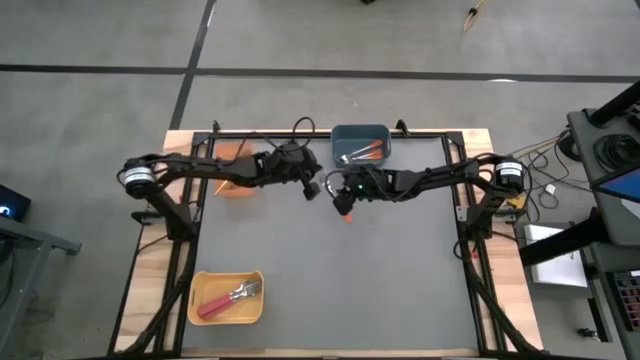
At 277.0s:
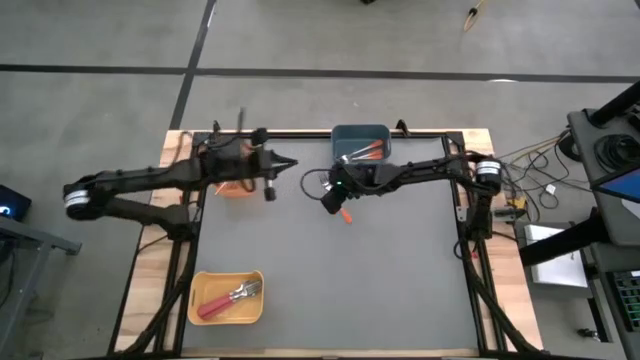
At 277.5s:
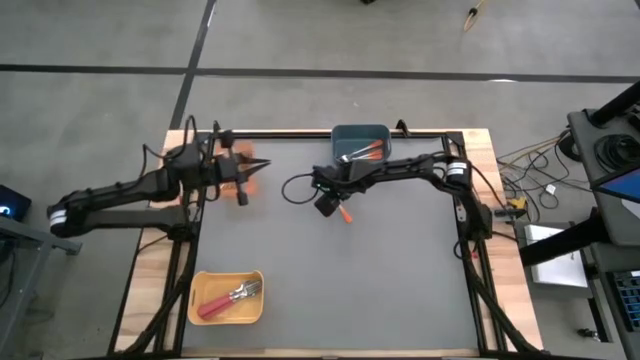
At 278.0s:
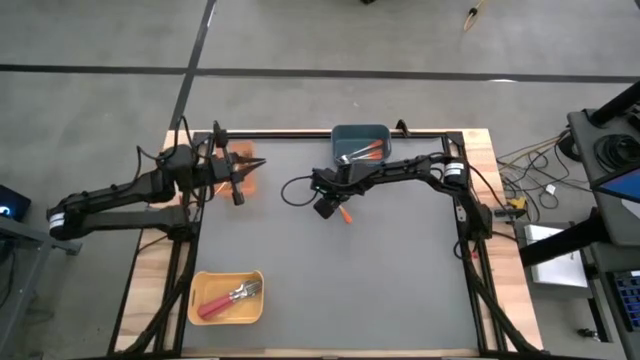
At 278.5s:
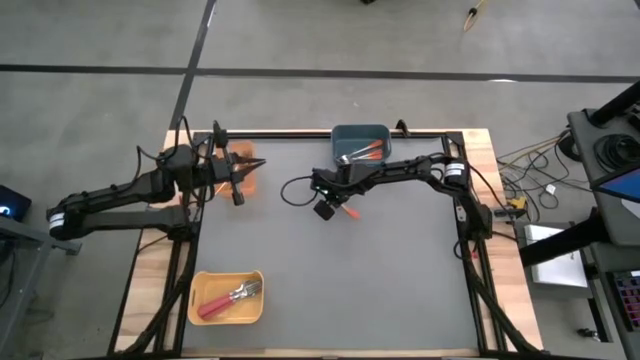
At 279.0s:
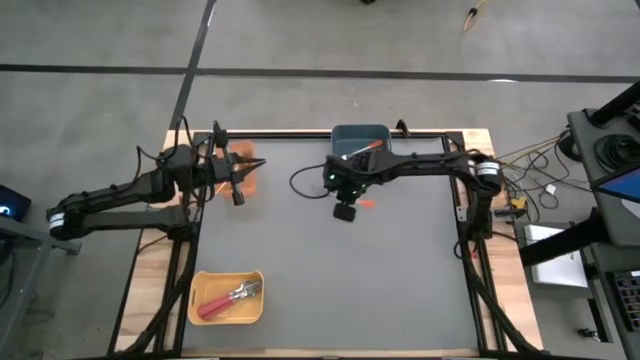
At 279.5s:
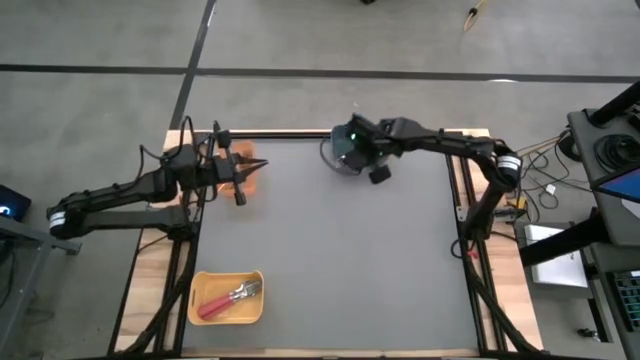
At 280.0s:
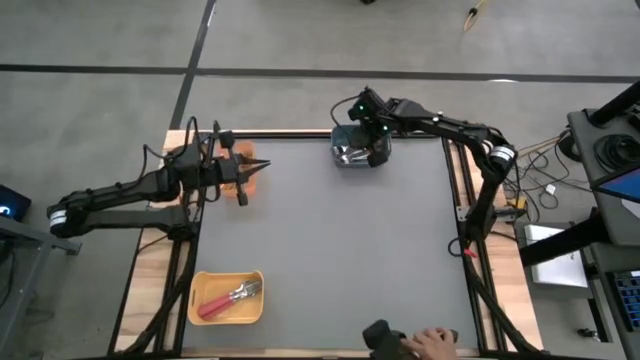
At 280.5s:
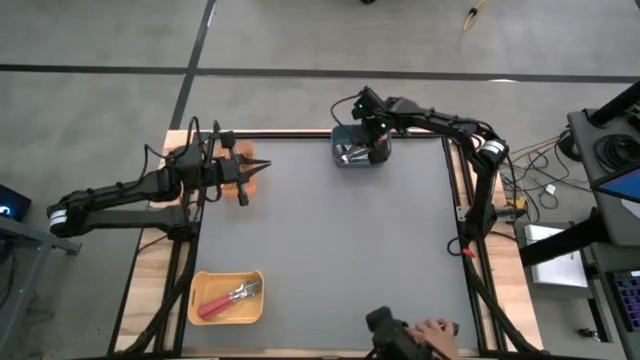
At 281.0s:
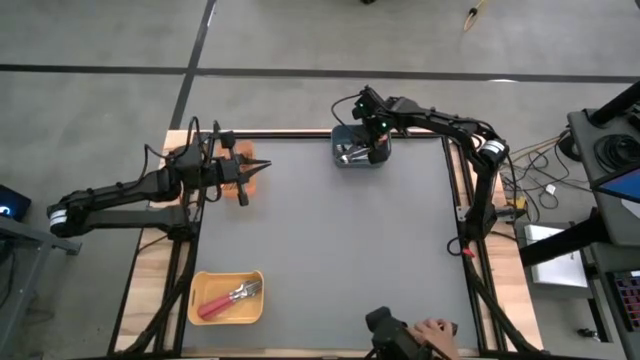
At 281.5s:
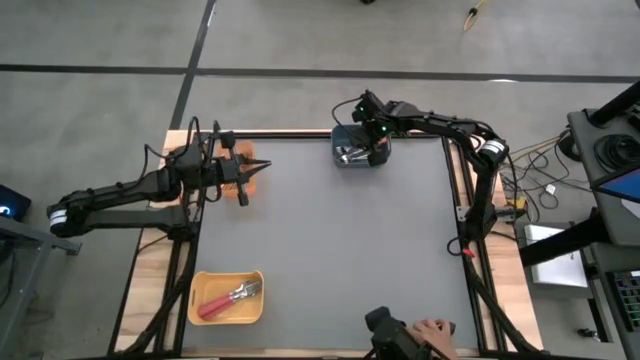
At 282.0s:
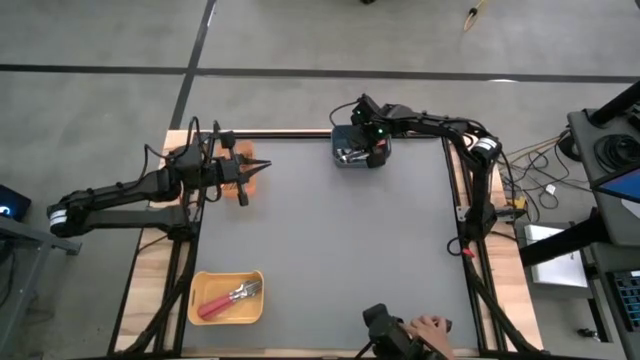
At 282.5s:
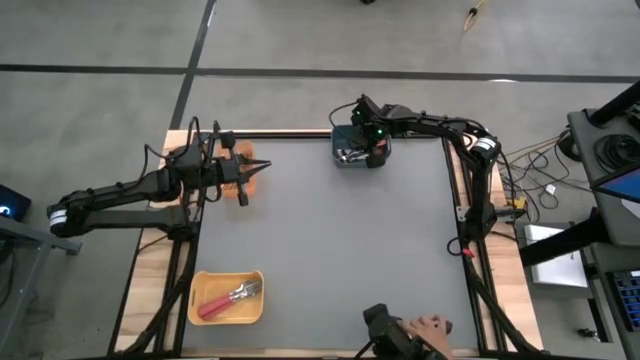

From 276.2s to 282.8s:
Task: Sort silverware by color (type)
Put the orange fork into the blue bin

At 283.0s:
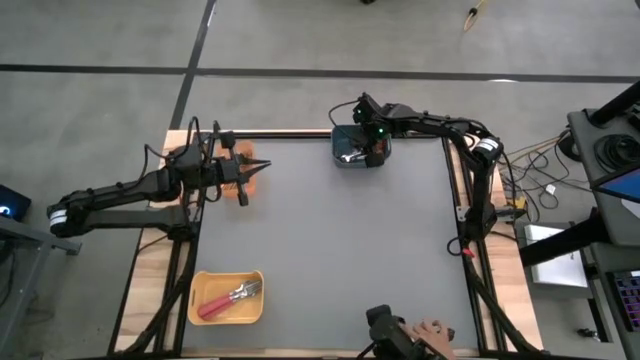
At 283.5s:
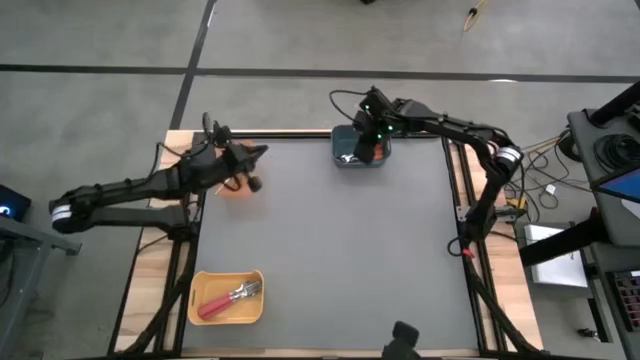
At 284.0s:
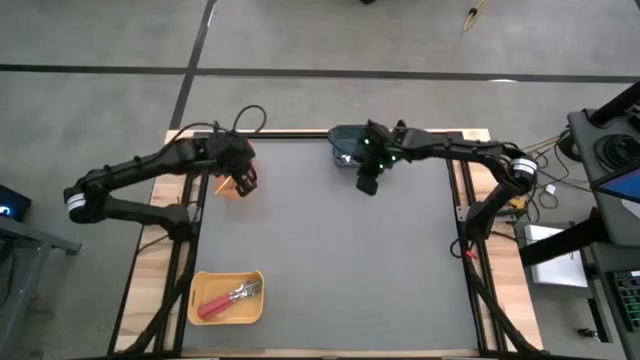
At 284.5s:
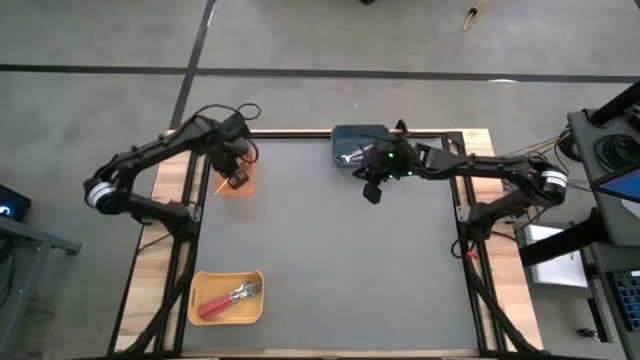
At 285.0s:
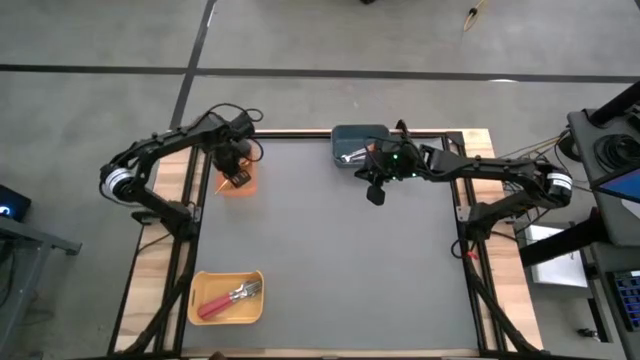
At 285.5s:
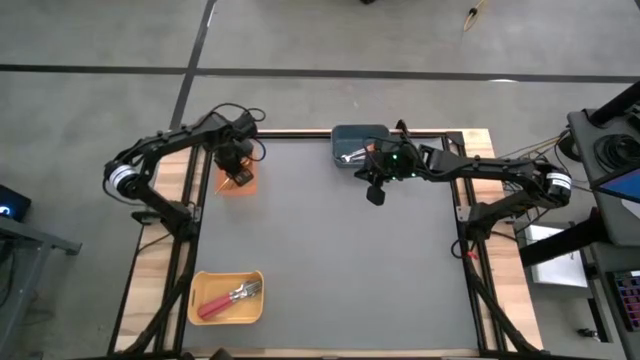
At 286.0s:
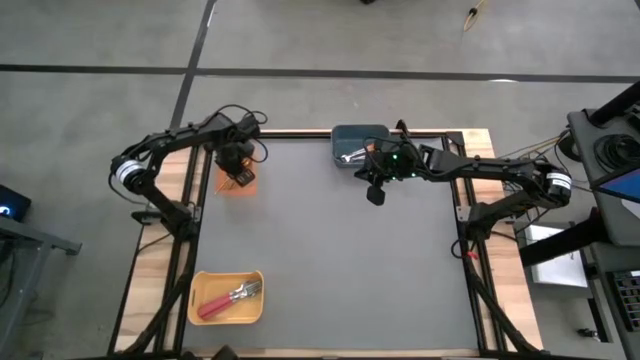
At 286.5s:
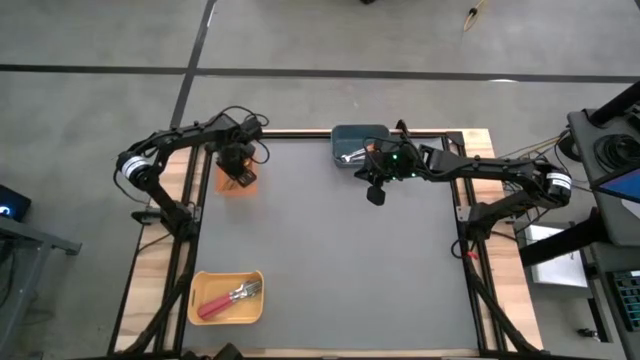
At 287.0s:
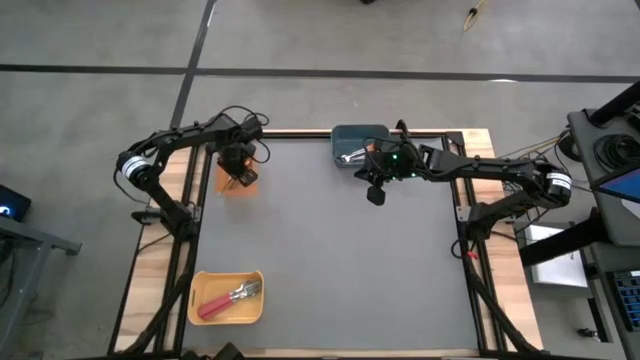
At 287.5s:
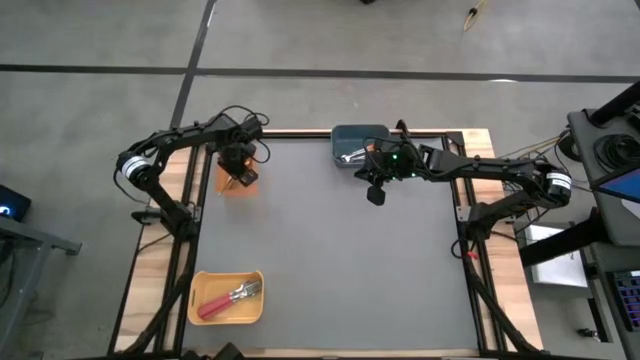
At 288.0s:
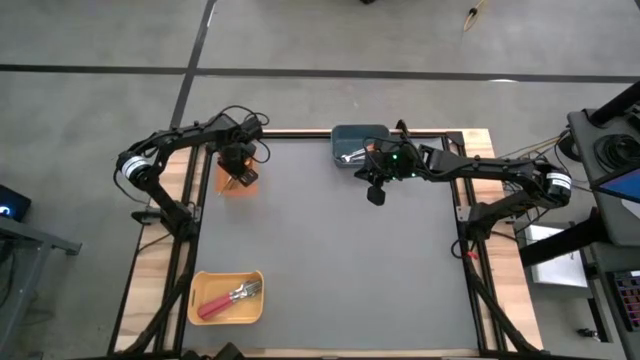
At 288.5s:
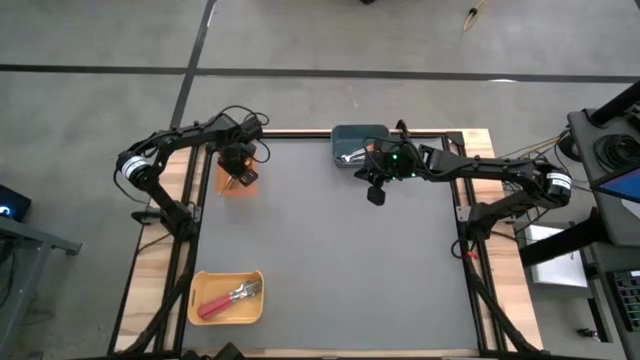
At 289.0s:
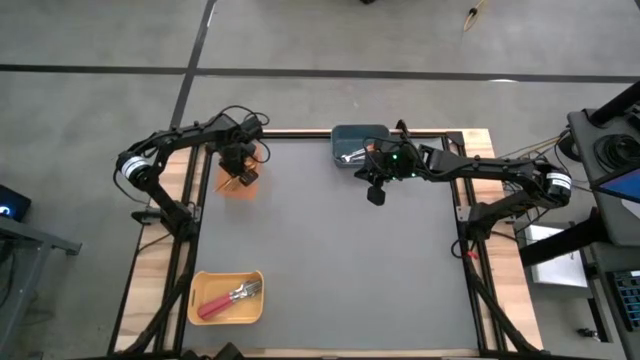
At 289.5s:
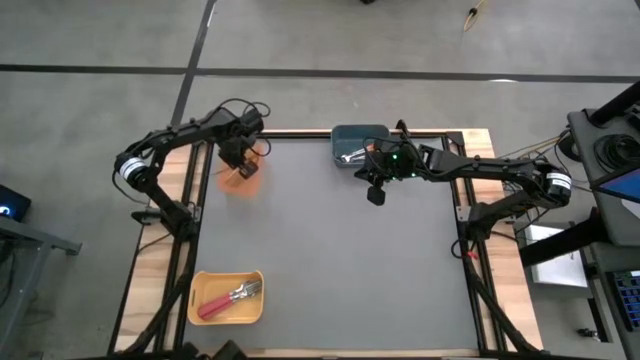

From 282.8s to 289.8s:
Adjust the gold fork into the orange bin

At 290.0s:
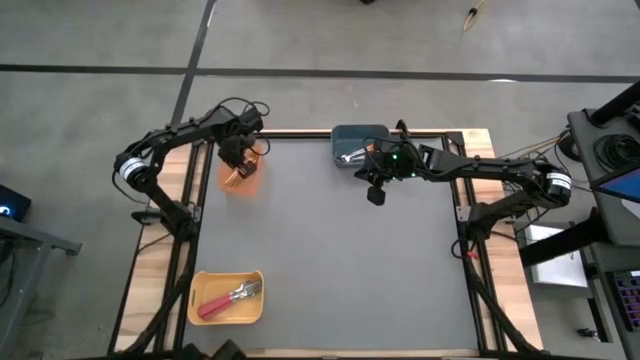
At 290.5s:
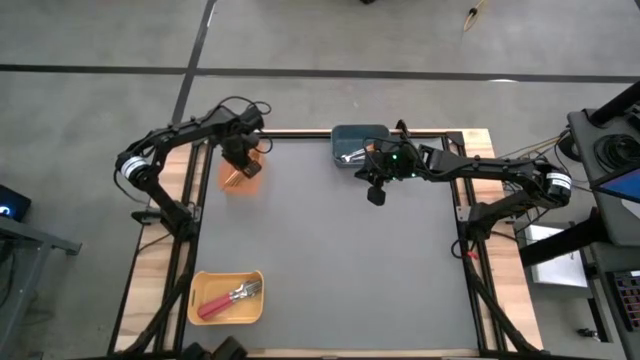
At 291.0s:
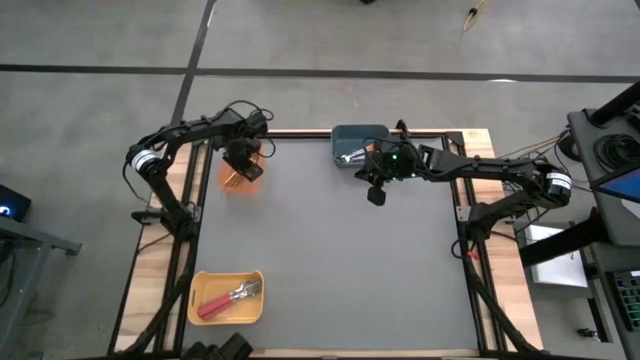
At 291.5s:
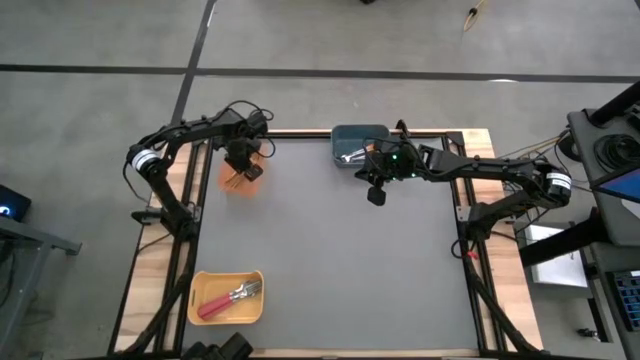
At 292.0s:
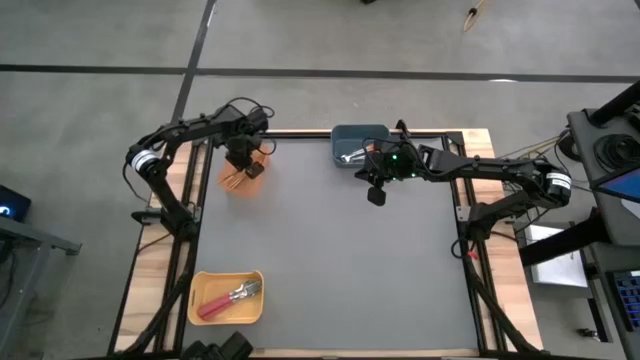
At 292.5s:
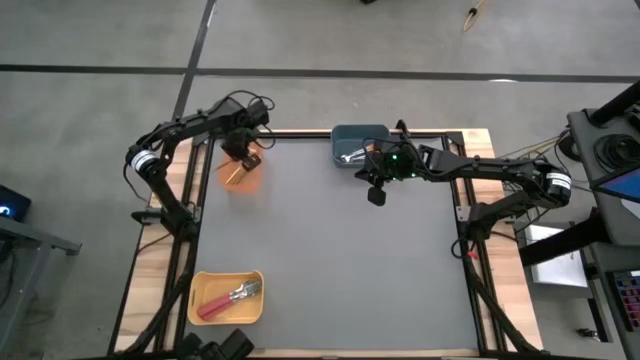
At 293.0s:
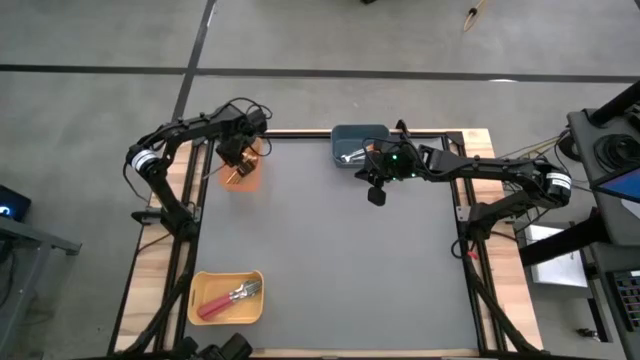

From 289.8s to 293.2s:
Adjust the gold fork into the orange bin

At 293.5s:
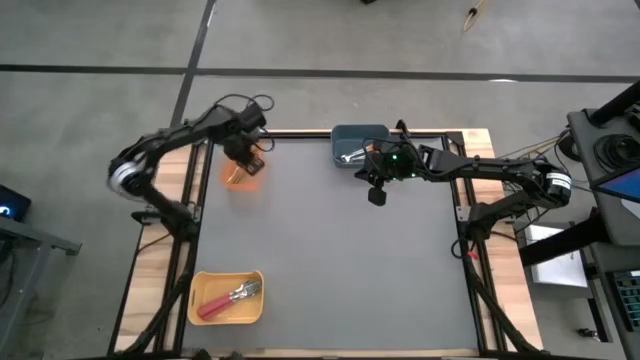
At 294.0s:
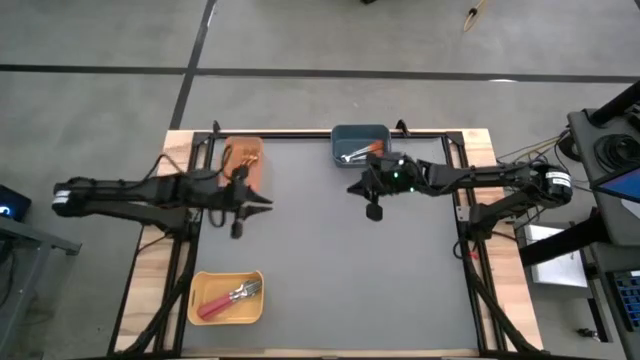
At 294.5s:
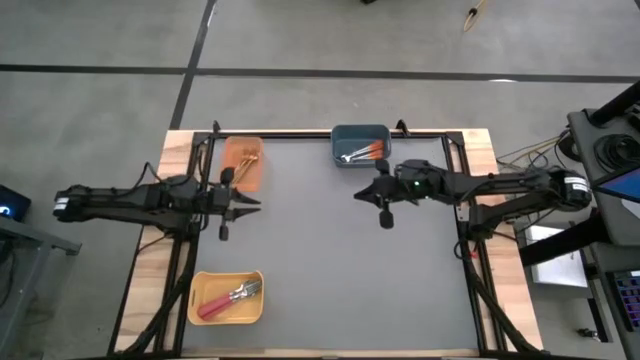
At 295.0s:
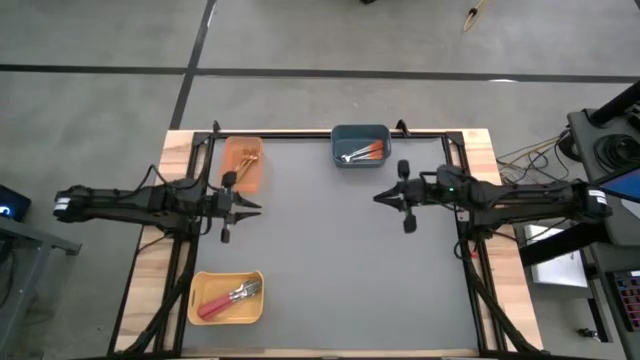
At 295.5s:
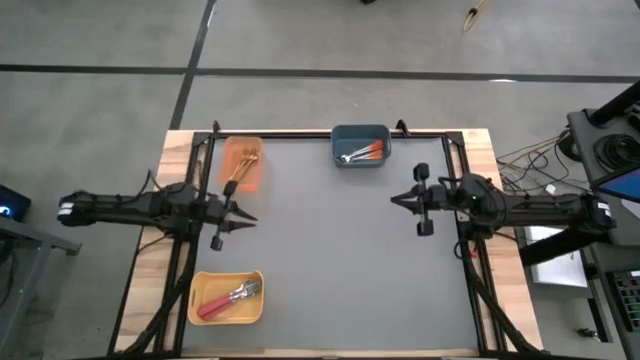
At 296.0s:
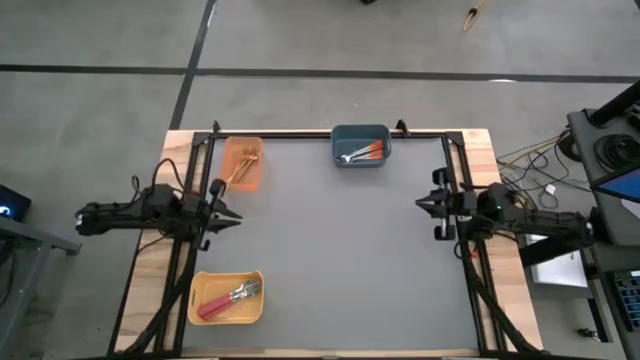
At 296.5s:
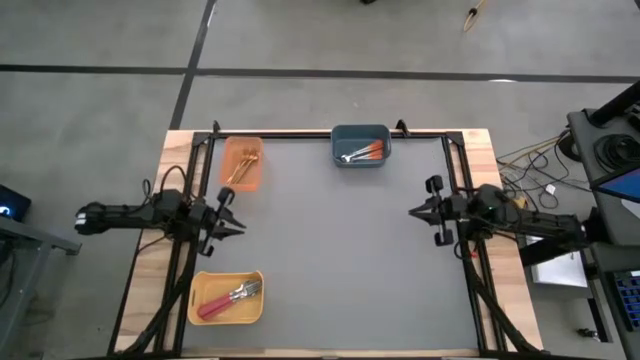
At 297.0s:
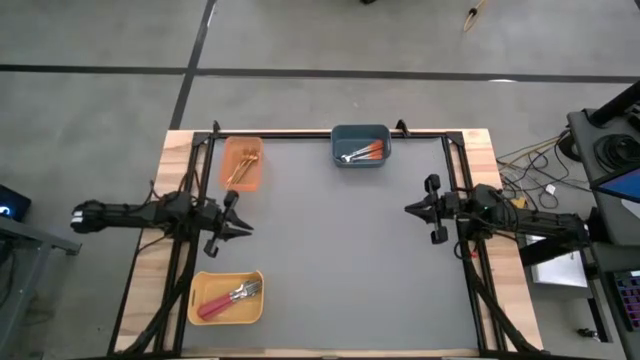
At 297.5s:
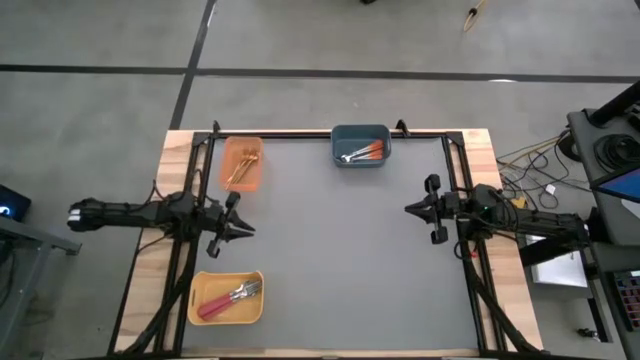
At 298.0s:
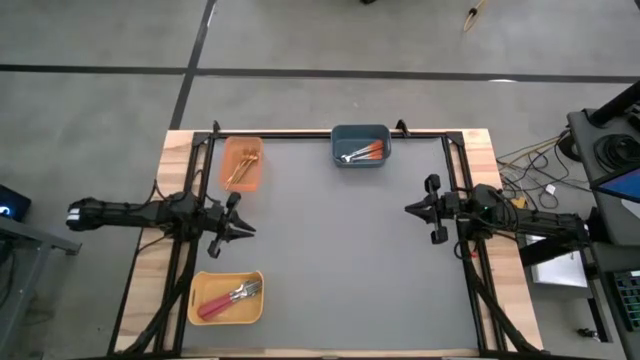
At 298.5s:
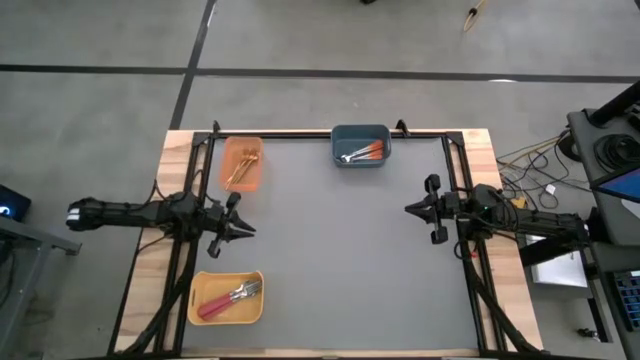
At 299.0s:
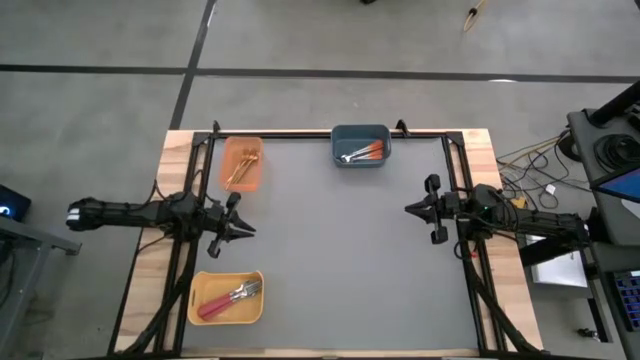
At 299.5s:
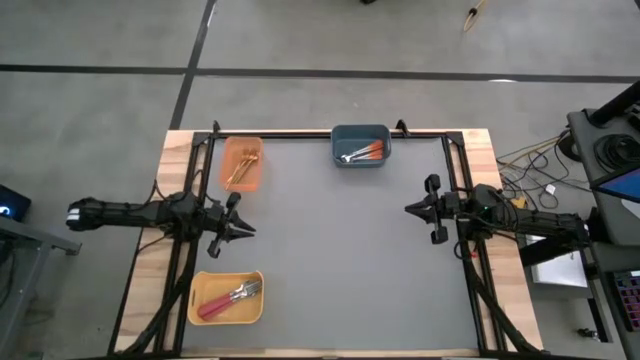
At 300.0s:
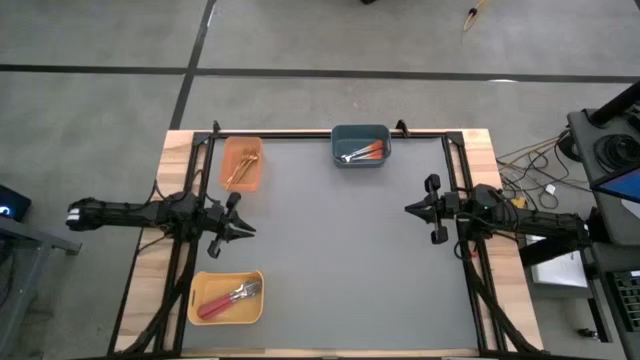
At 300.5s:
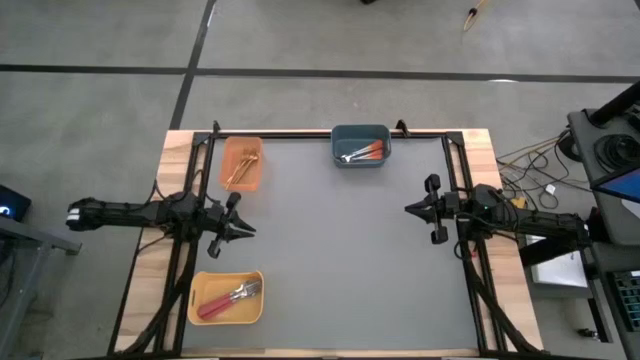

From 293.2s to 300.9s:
Return to Home Position
